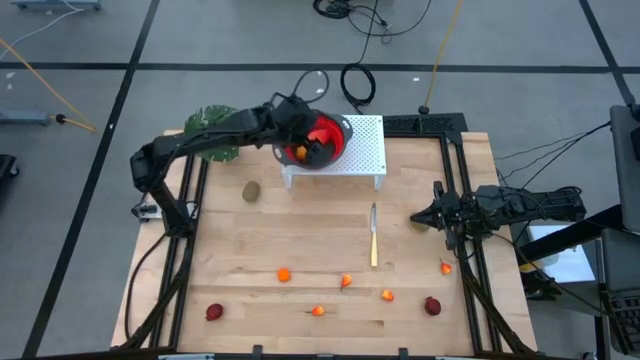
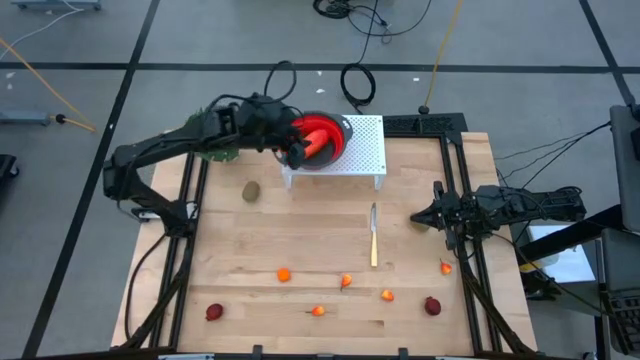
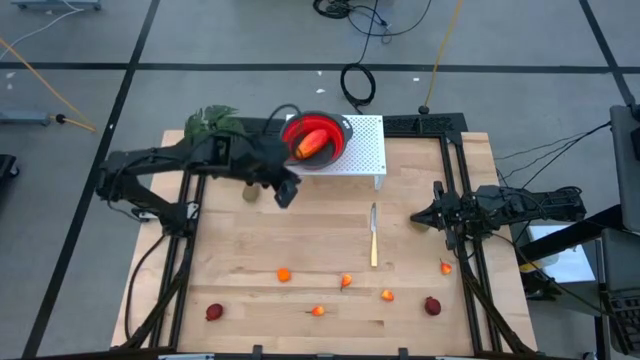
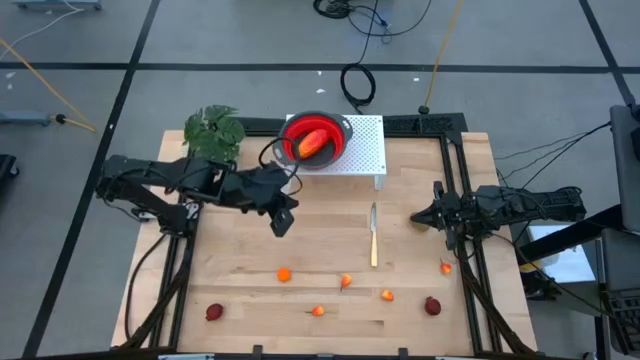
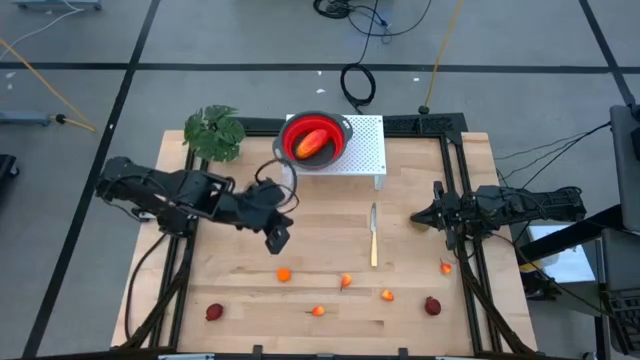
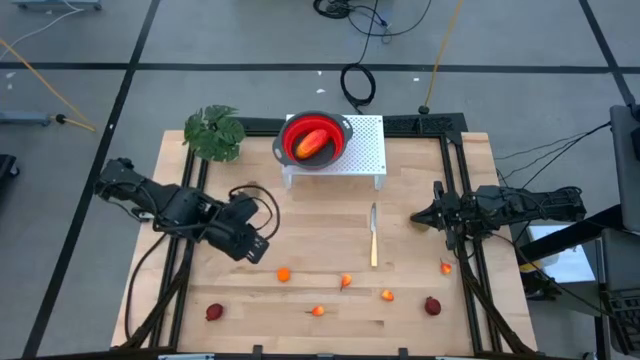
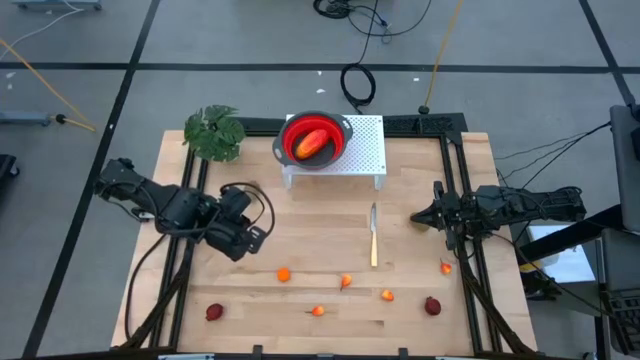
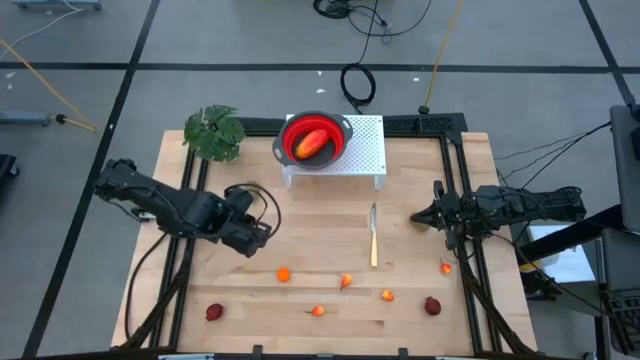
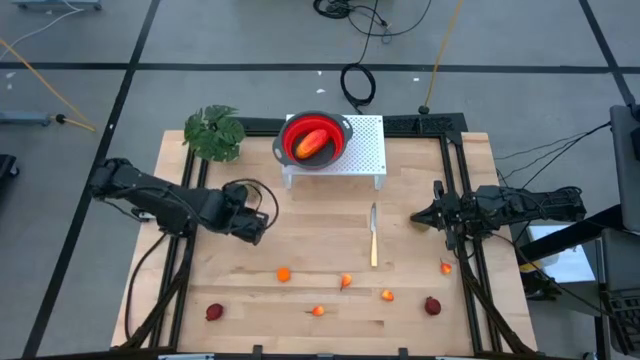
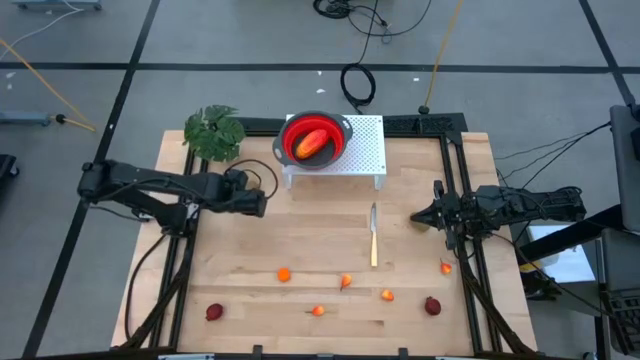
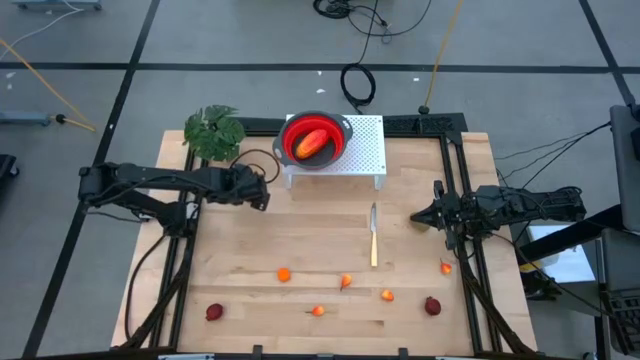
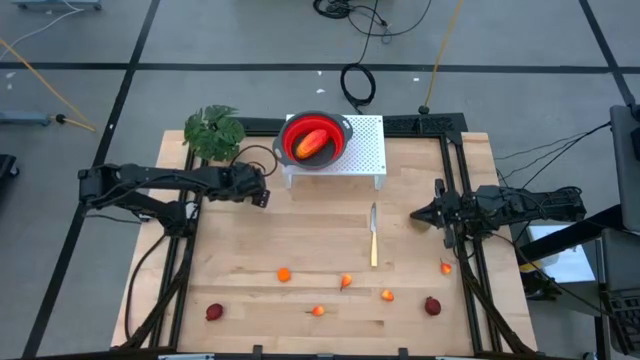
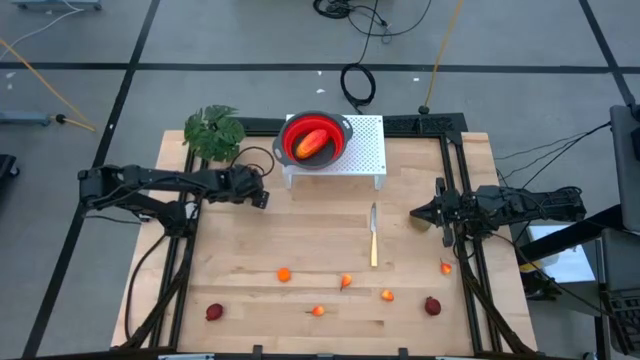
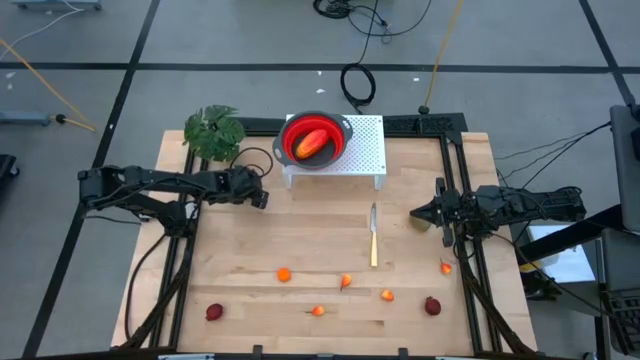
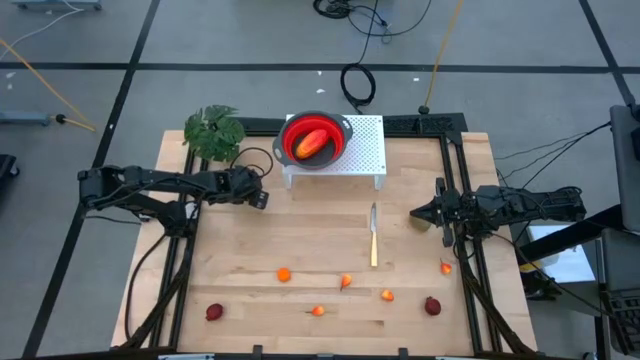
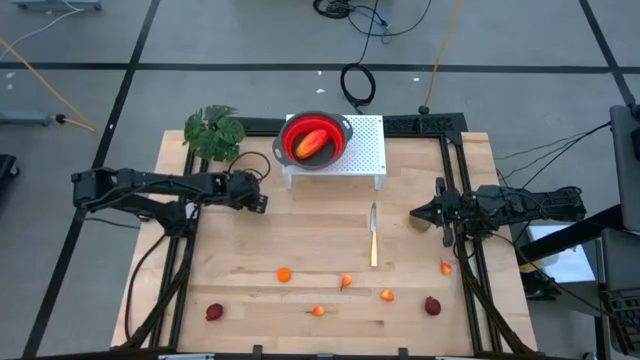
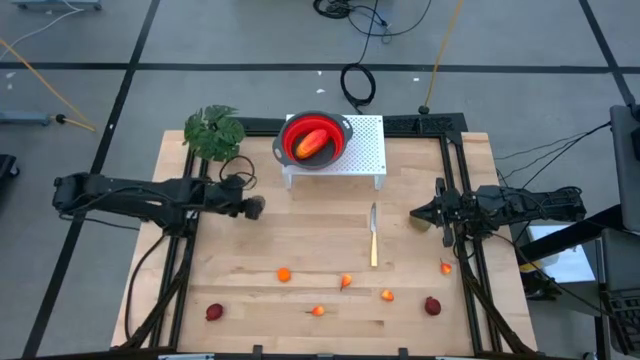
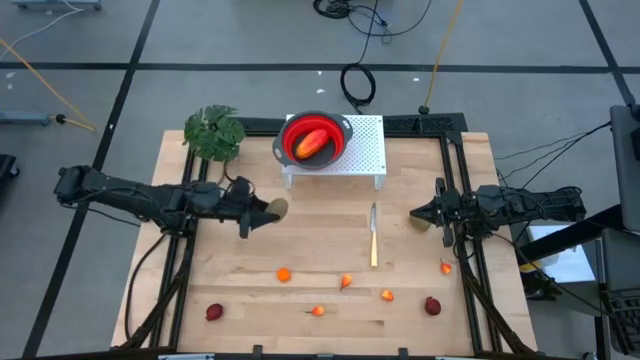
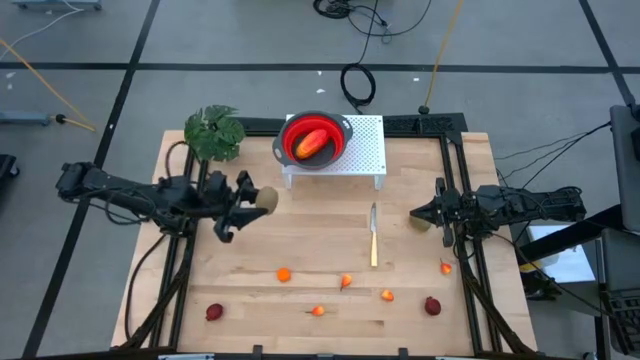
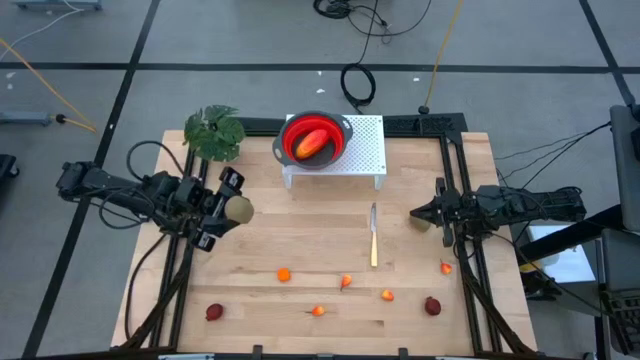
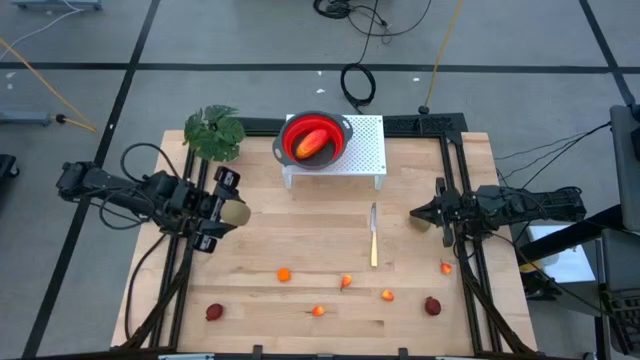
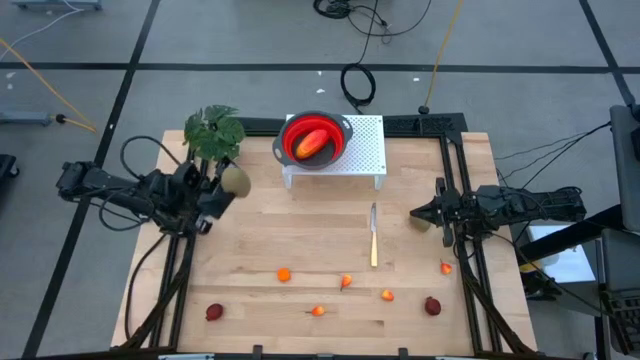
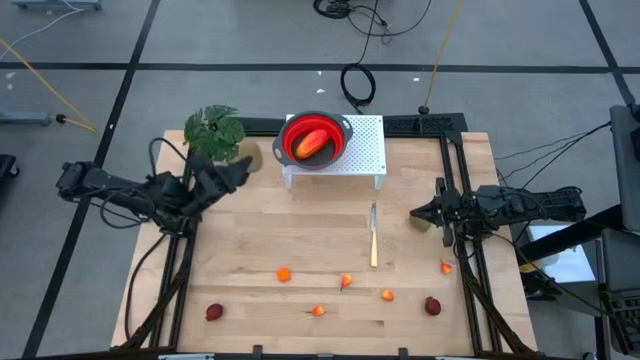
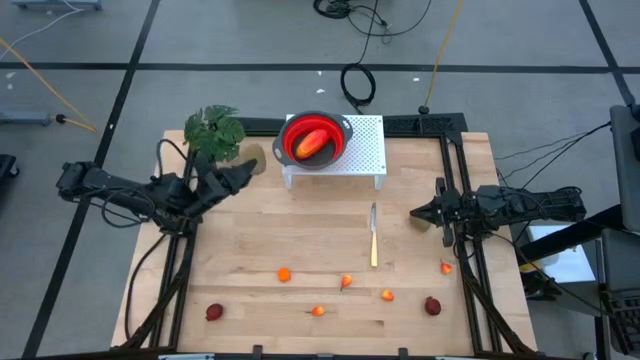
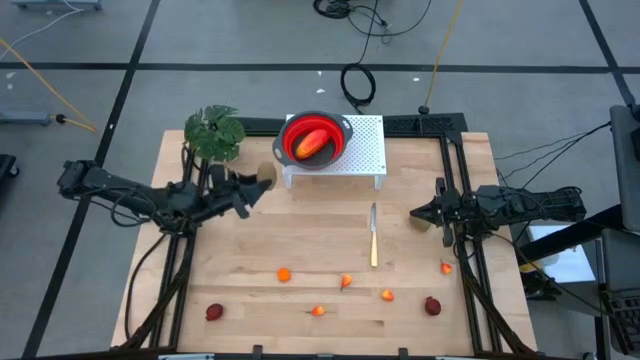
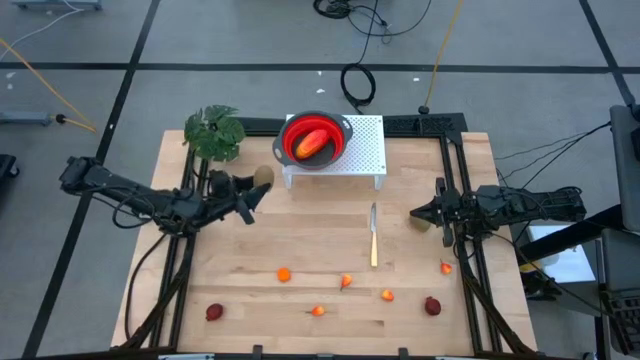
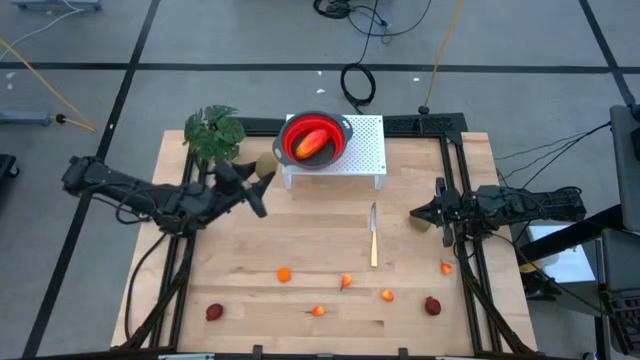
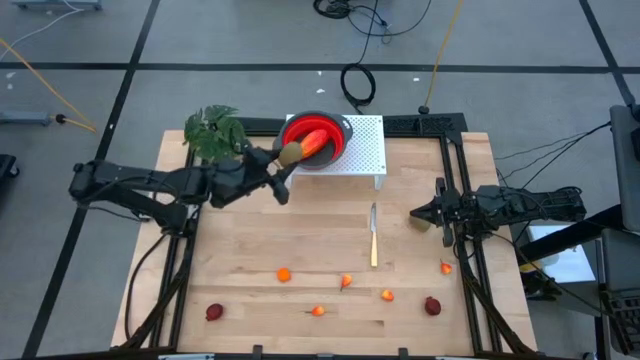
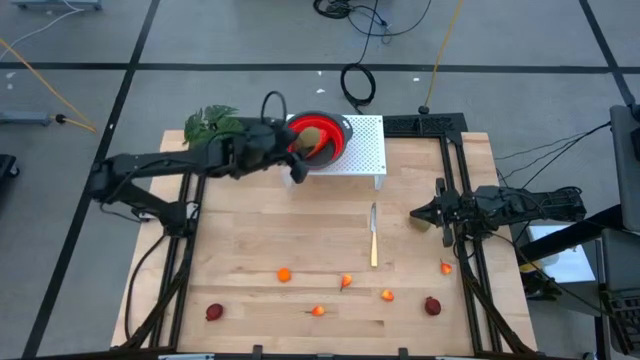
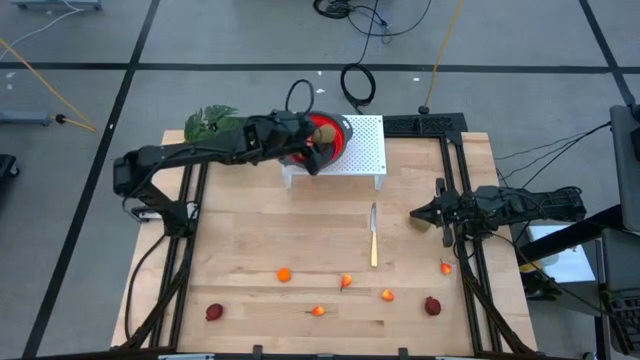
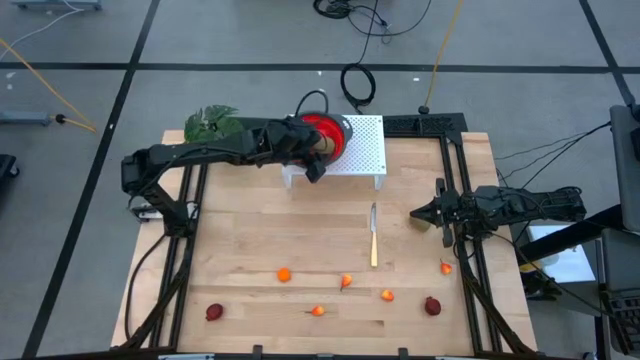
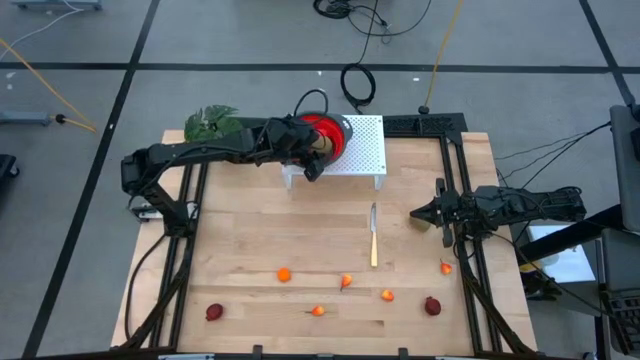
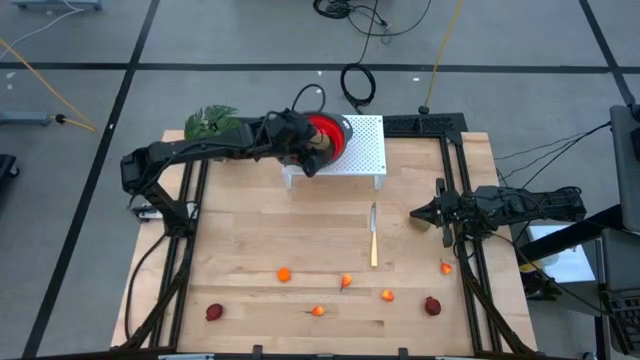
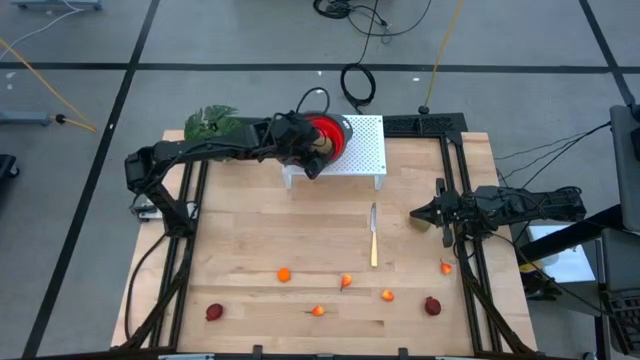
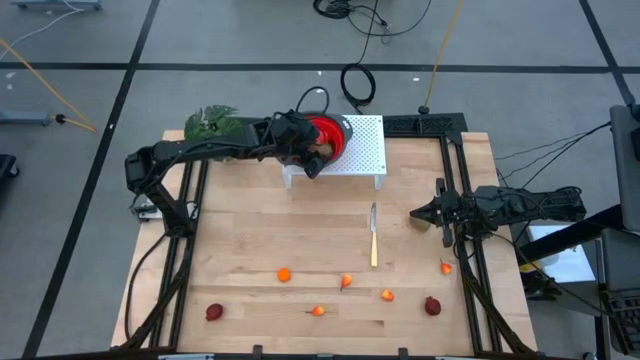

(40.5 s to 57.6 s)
Task: Pick & Place Fruit
Put the left green kiwi into the red strainer bowl on the shelf
